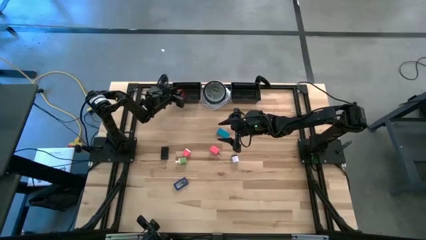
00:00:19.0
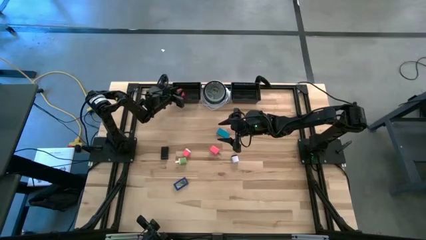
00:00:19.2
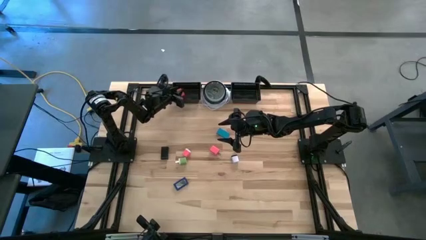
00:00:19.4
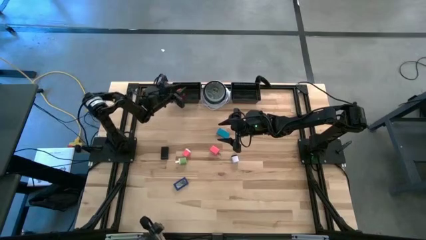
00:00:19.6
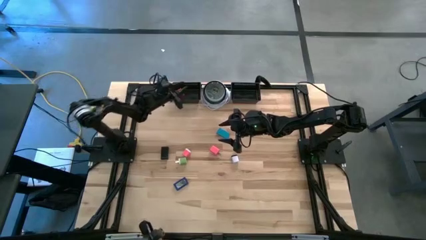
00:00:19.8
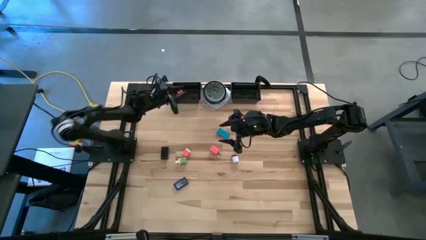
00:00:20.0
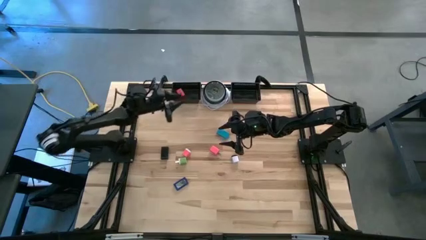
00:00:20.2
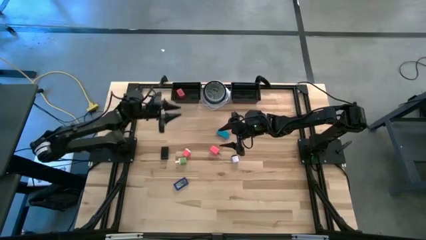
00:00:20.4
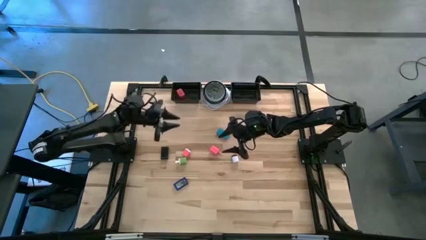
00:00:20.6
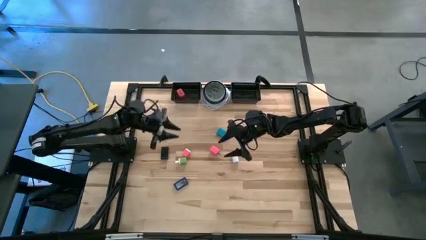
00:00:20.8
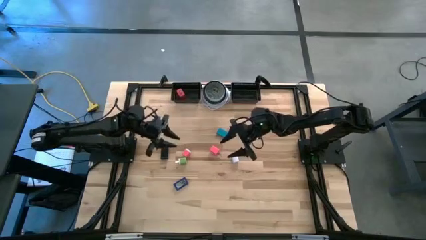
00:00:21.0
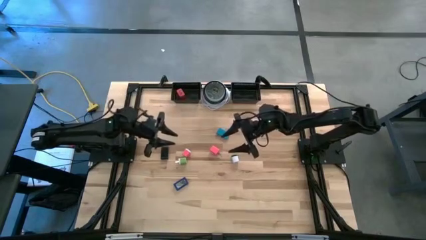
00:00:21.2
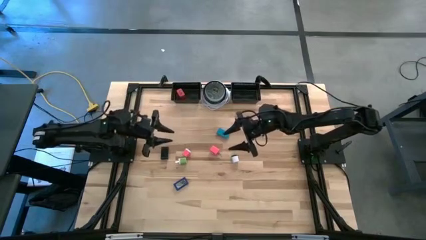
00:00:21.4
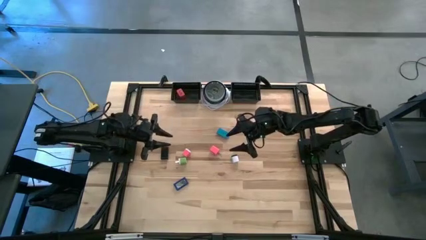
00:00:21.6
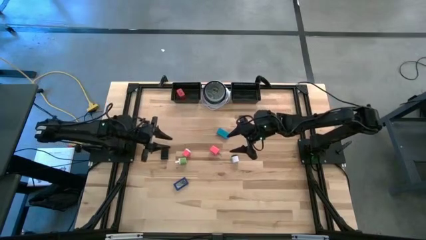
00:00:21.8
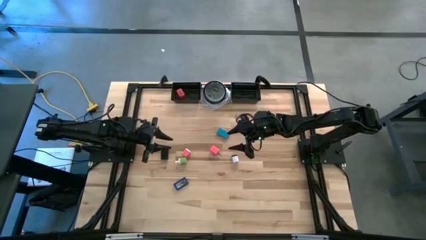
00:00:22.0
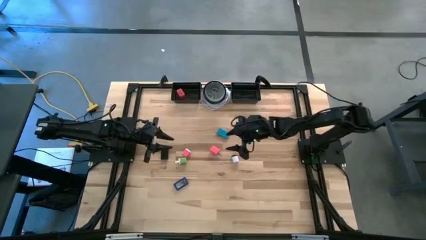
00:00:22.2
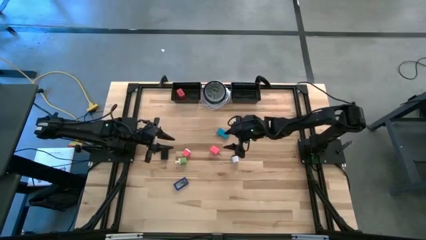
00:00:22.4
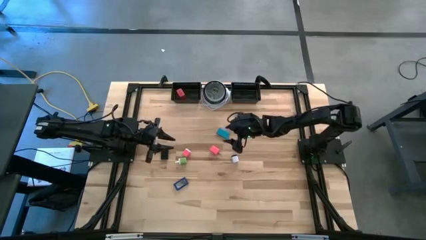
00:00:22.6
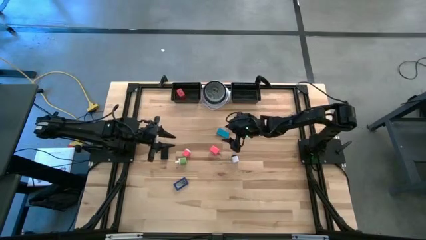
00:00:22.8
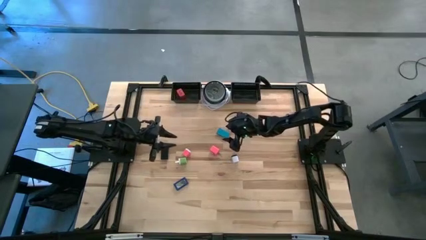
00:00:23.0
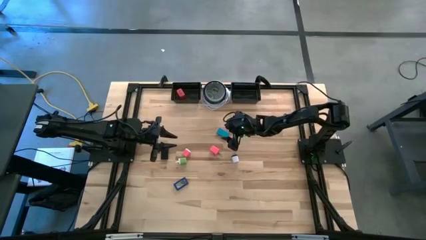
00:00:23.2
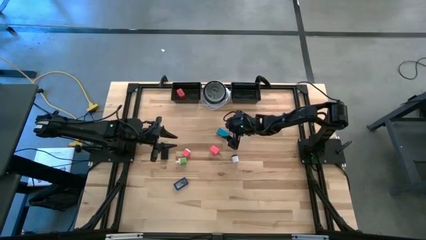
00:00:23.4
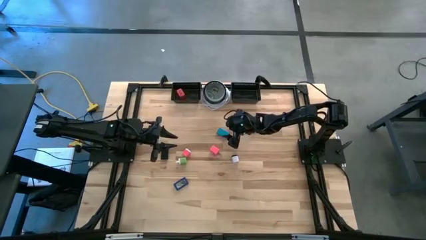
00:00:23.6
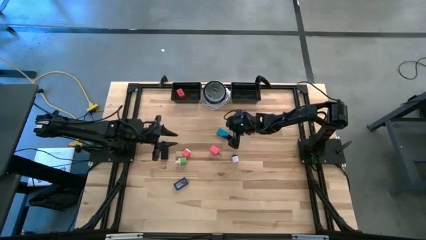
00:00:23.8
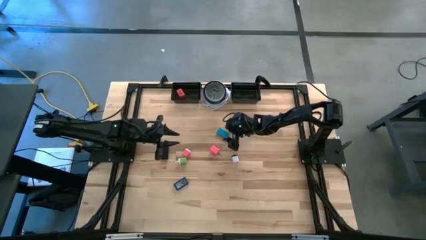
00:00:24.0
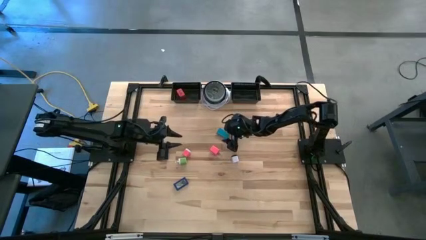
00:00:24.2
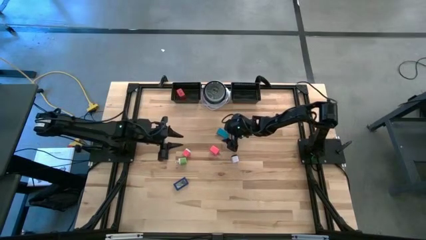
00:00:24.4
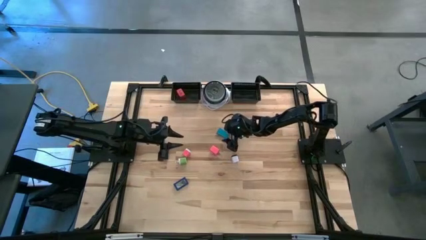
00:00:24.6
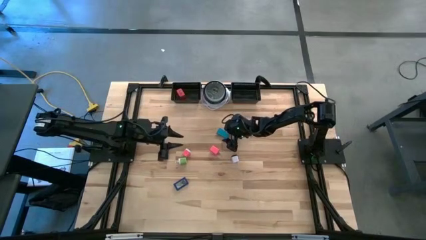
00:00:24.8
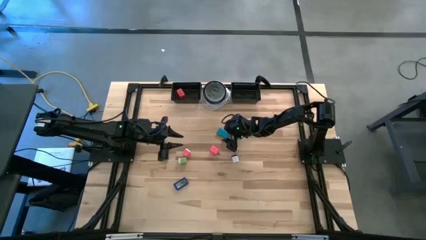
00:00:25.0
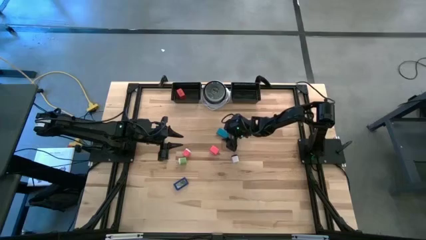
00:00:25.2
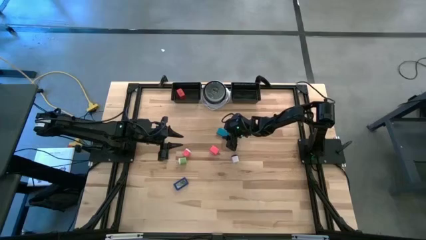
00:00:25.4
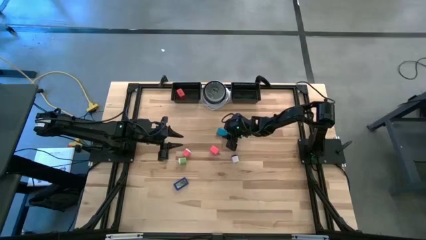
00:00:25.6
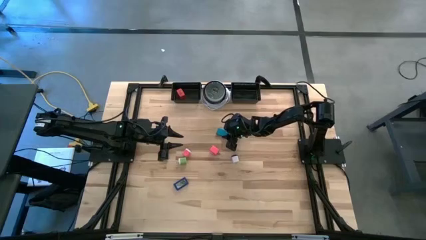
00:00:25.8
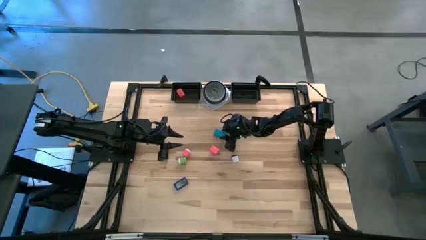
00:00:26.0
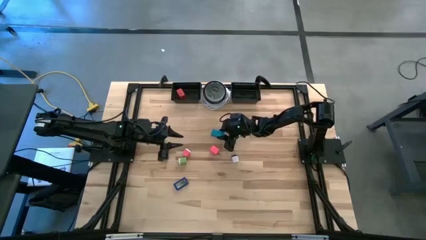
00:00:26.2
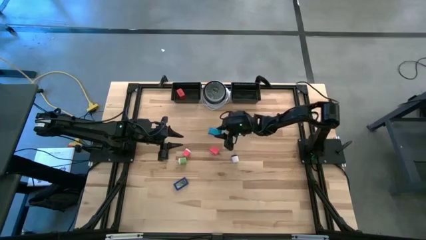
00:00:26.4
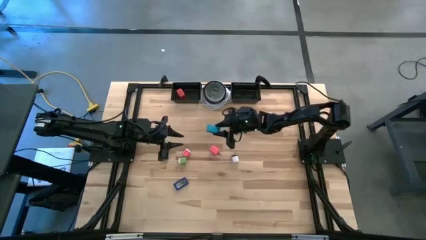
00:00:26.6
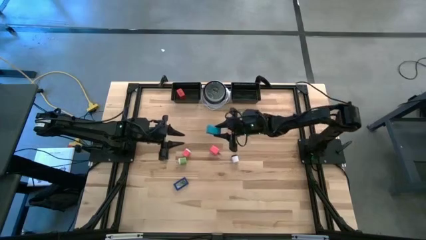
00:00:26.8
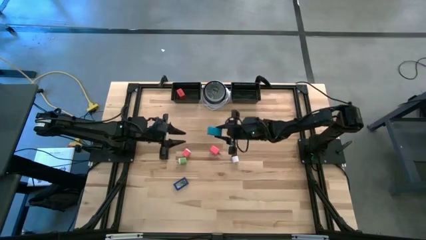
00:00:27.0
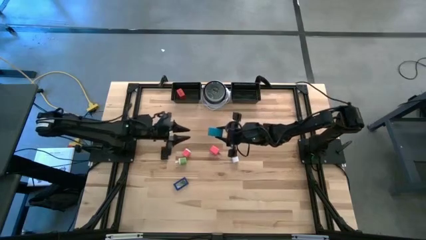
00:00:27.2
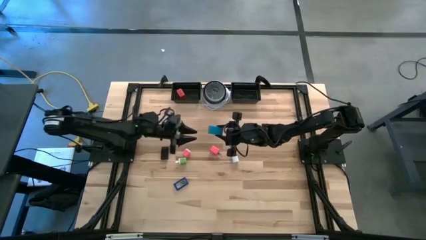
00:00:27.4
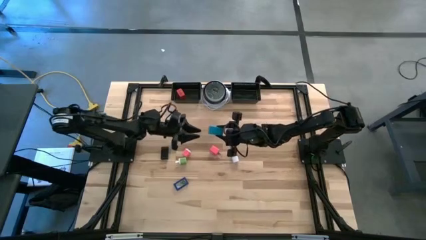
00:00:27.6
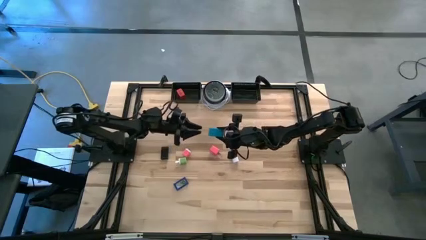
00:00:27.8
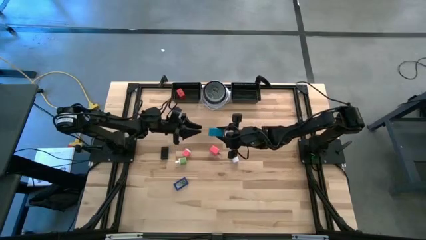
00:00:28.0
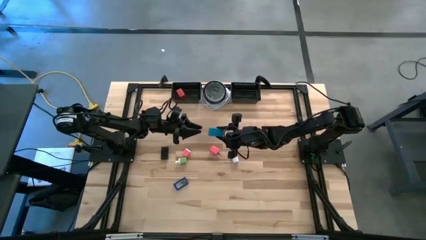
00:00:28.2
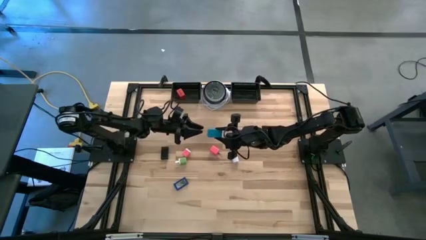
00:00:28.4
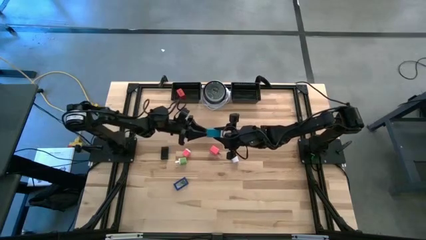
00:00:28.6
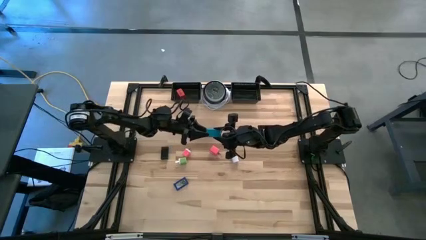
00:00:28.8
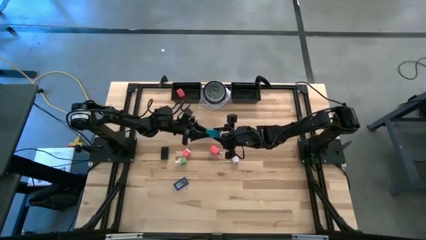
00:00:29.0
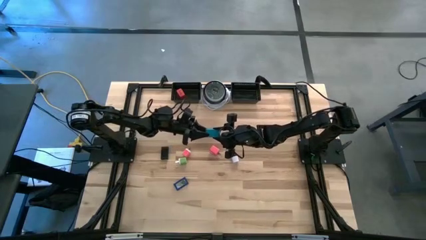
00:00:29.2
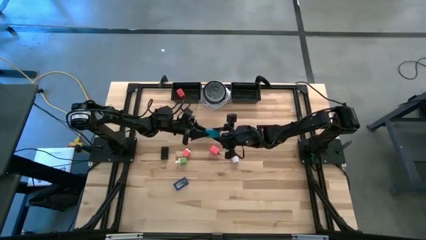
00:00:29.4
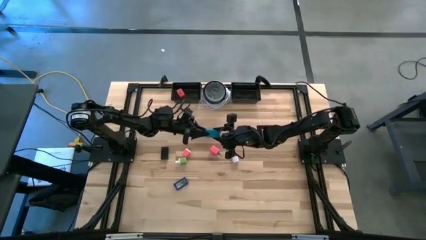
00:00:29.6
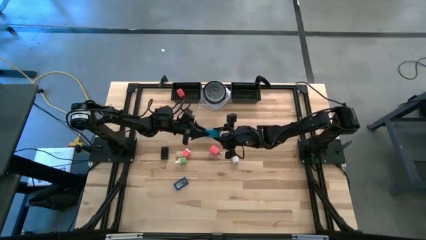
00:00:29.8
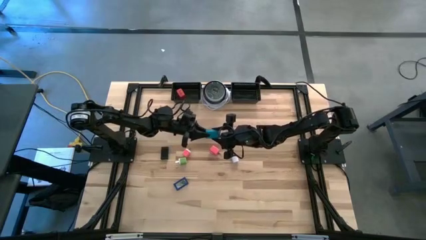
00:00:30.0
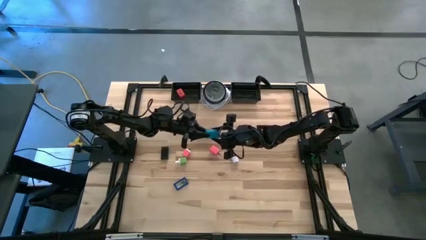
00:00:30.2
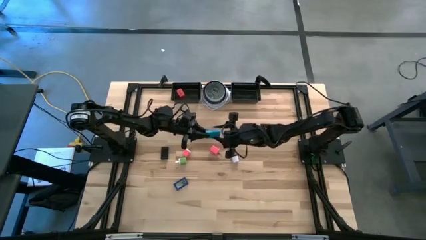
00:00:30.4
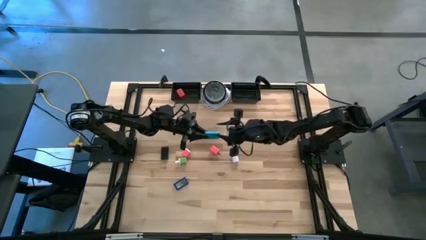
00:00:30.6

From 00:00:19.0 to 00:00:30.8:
Task: Pick & Place Office items
Put the light blue digital clock into the right black basket
